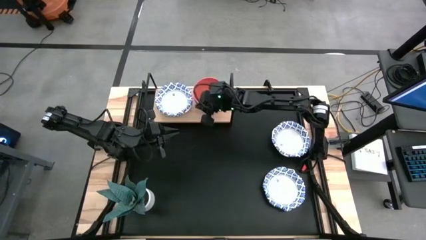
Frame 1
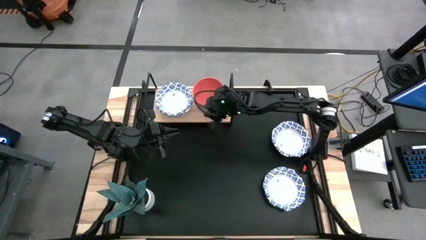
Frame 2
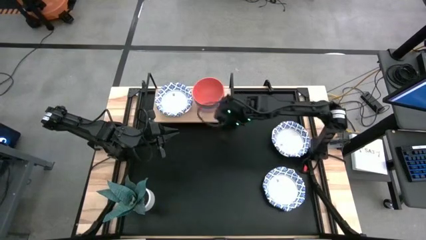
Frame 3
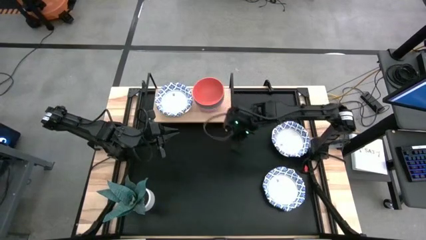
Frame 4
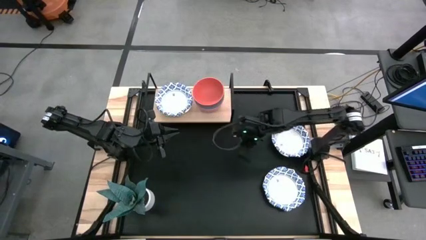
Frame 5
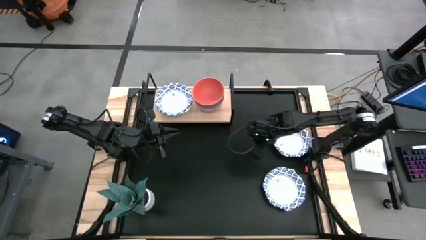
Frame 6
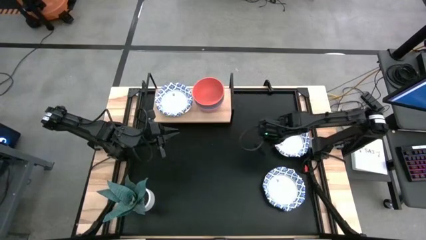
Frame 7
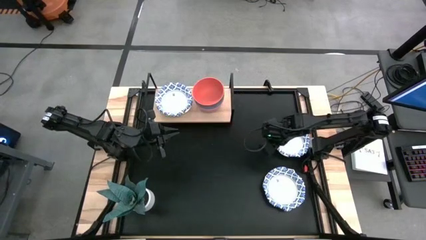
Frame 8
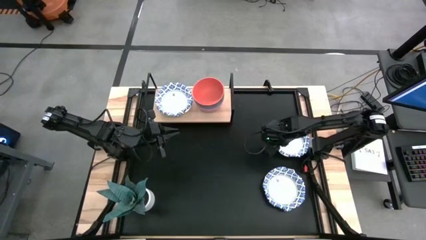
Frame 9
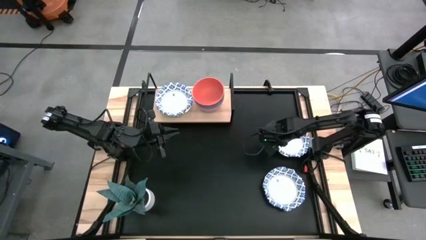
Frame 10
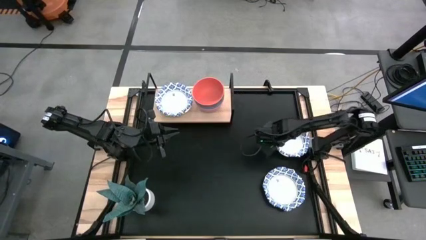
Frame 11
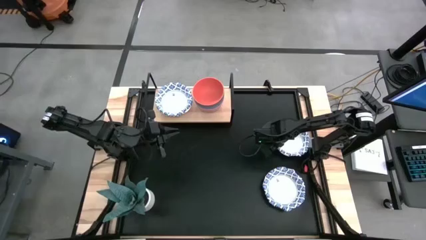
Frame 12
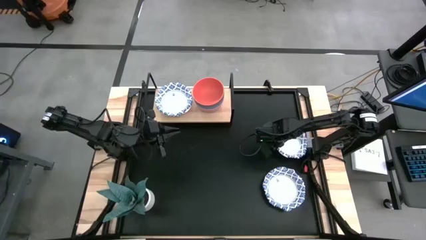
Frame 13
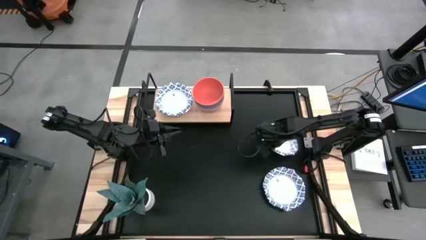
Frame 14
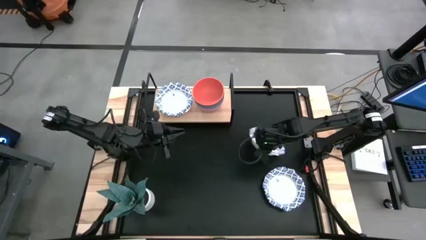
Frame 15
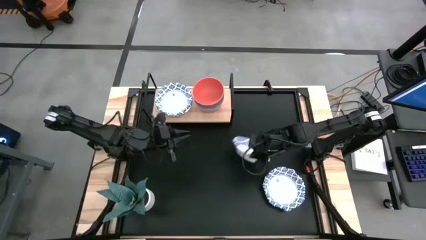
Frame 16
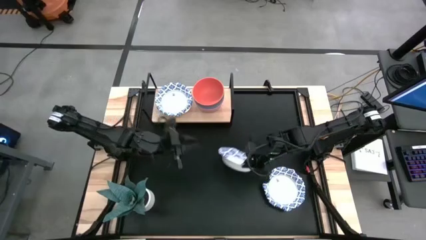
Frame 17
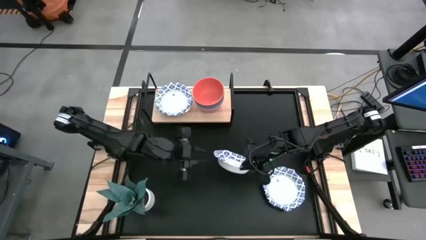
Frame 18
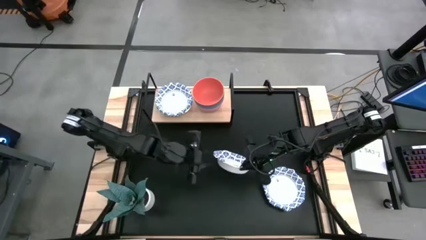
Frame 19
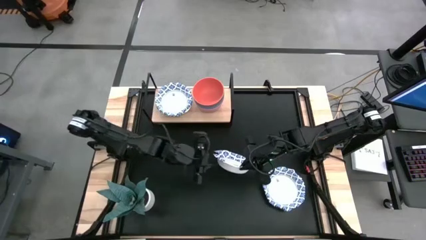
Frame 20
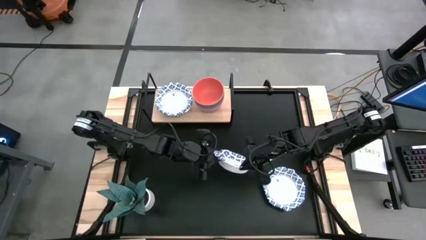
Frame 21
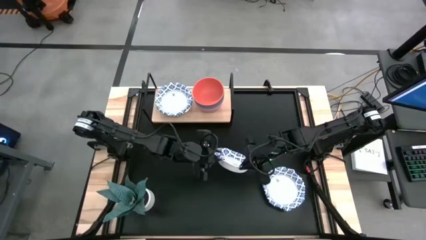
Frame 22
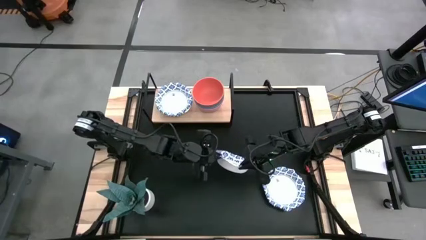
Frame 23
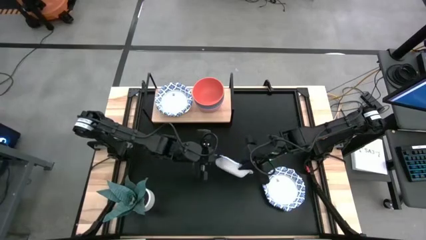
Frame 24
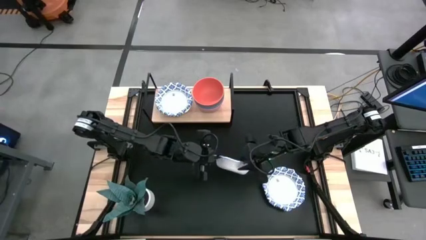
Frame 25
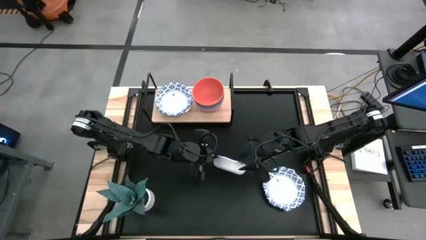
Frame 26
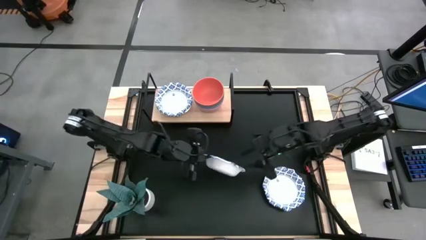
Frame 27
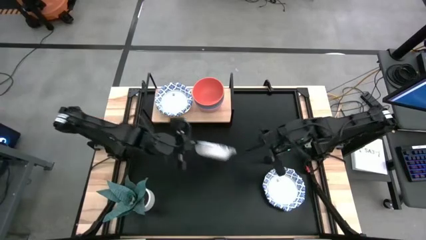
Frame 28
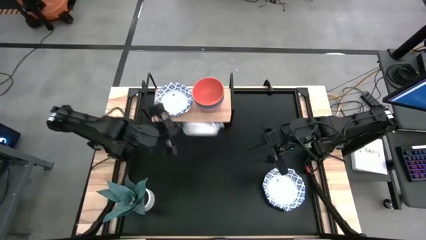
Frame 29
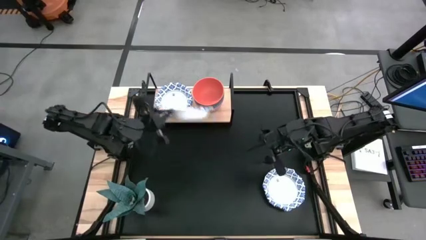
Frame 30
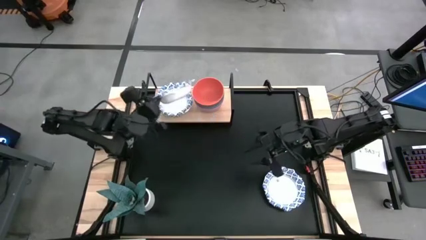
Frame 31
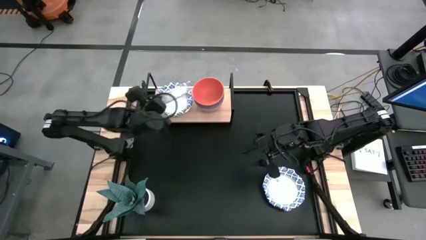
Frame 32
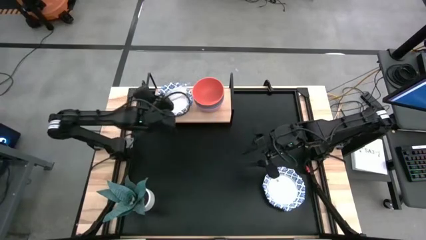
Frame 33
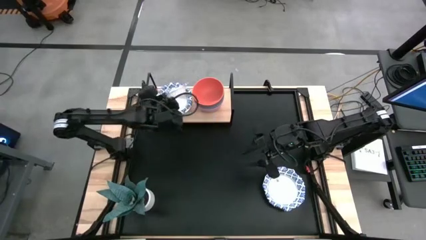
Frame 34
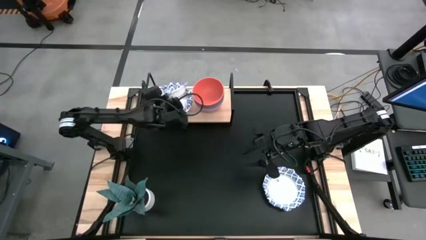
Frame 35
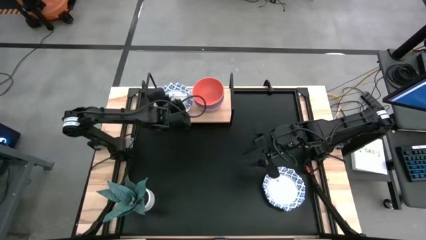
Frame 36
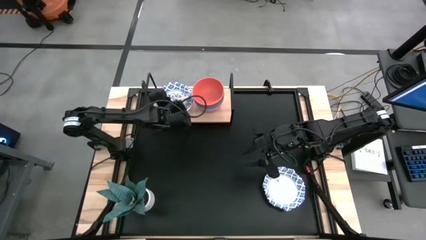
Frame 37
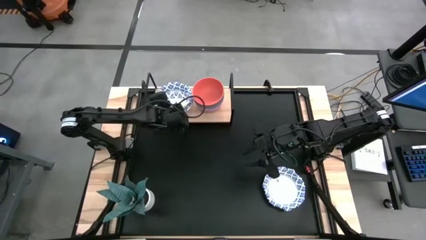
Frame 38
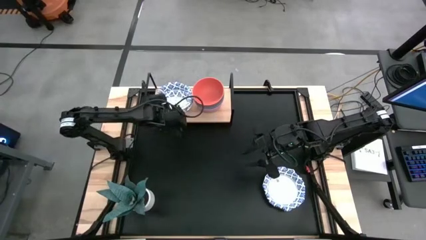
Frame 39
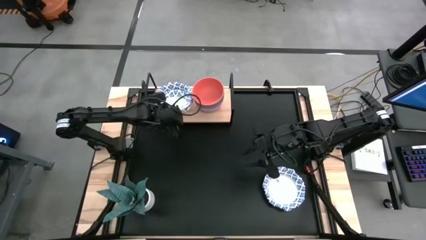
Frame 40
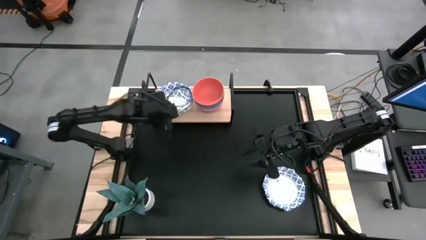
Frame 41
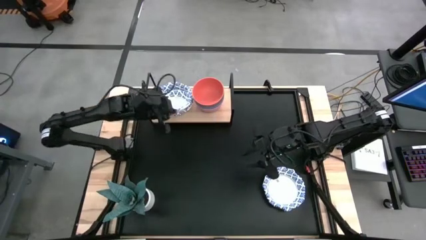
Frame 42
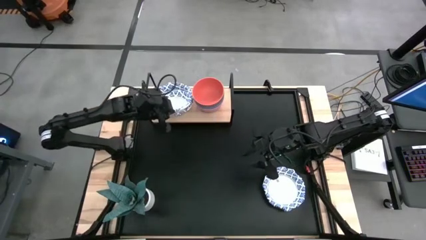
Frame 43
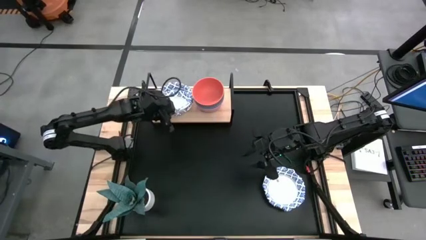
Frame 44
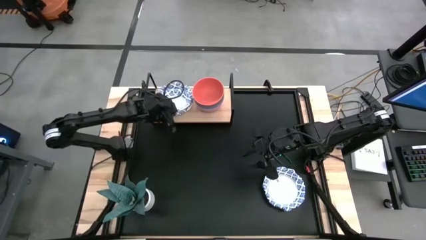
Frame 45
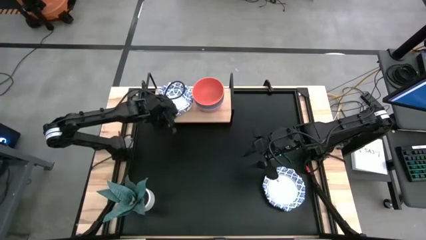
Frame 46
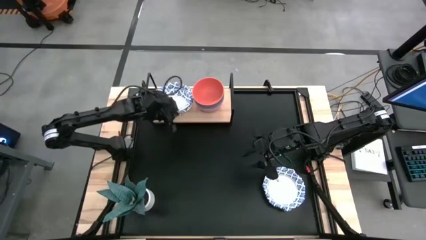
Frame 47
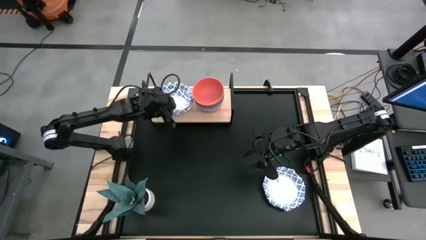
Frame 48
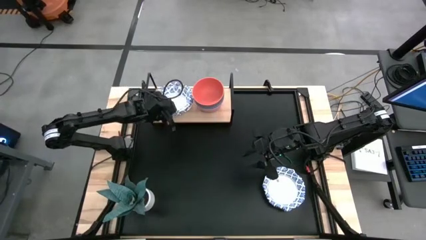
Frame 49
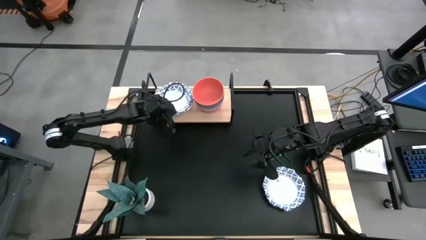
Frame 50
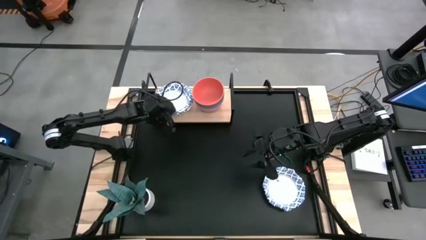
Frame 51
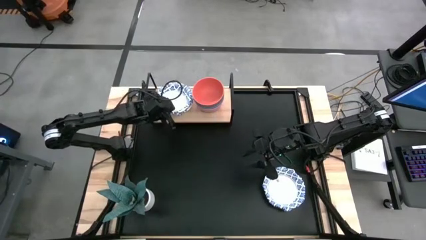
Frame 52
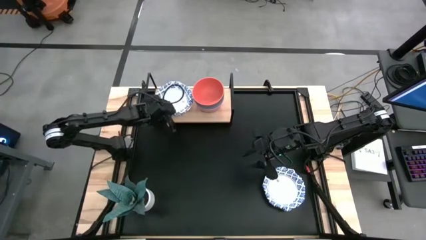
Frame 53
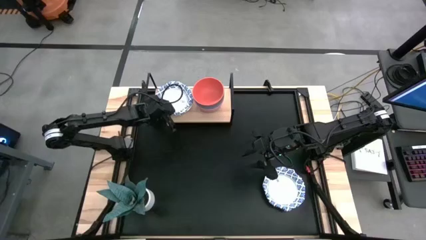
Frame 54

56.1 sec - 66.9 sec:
Task: Place and stack bowls onto a shelf
Stack the white patterned bowl on top of the white patterned bowl

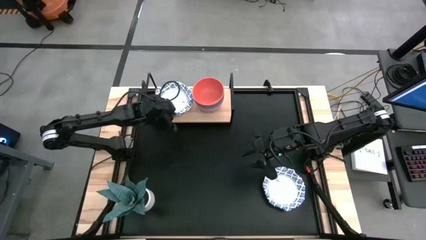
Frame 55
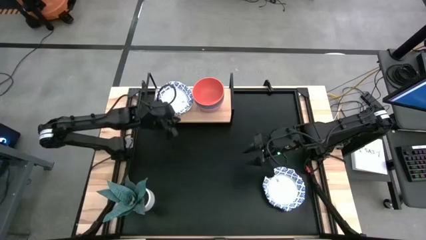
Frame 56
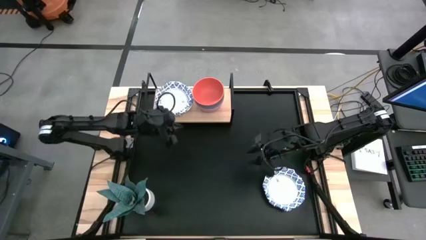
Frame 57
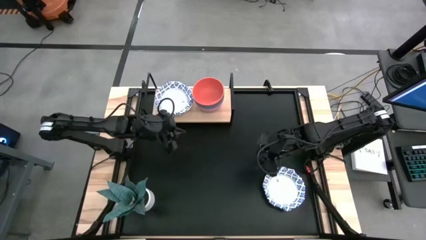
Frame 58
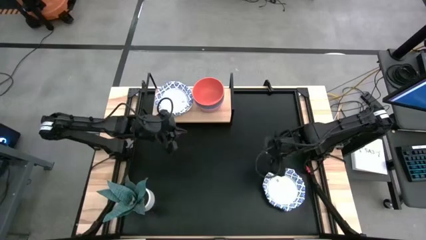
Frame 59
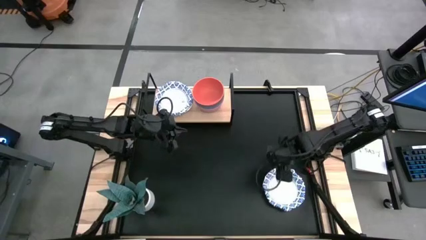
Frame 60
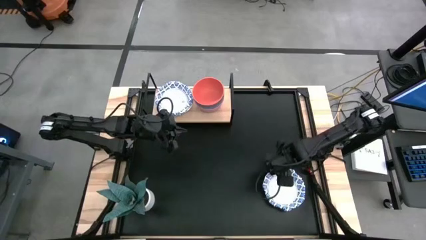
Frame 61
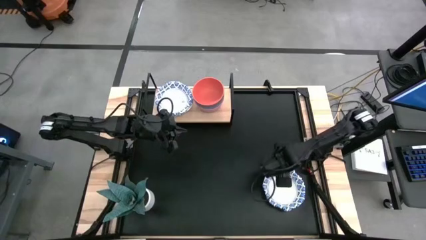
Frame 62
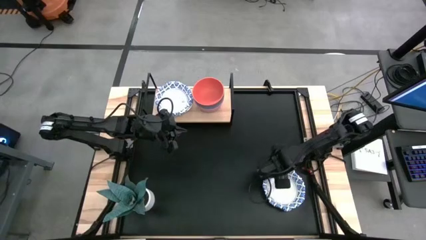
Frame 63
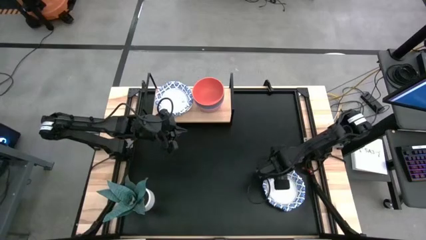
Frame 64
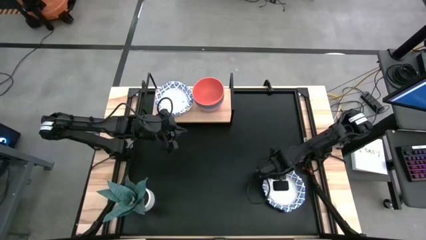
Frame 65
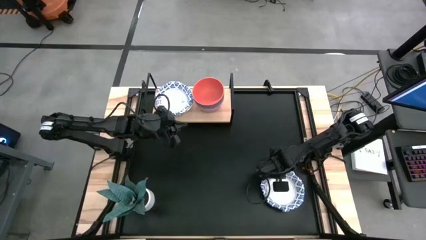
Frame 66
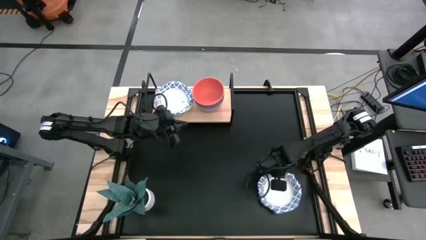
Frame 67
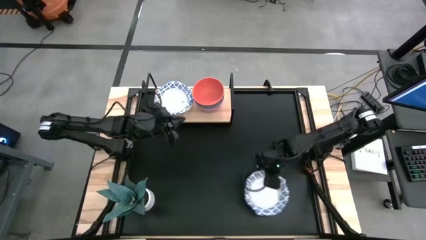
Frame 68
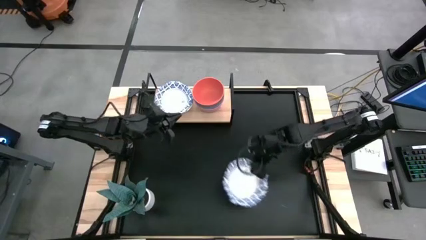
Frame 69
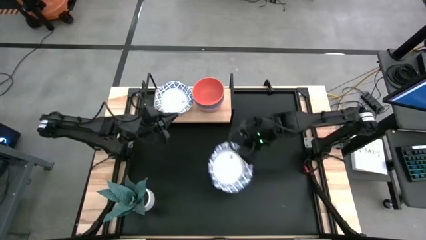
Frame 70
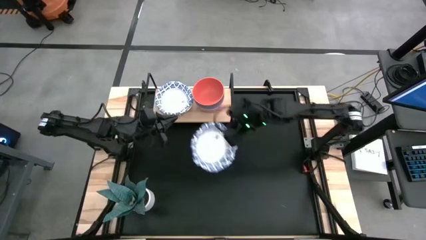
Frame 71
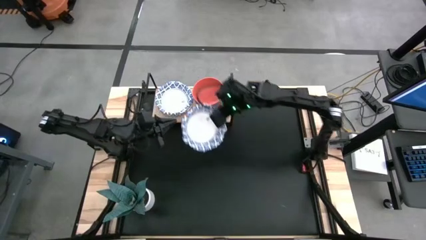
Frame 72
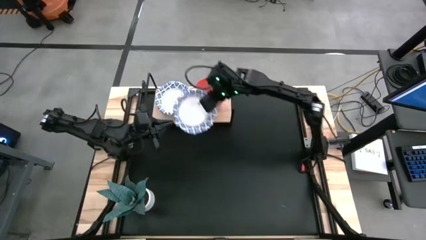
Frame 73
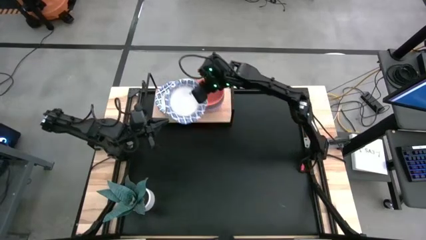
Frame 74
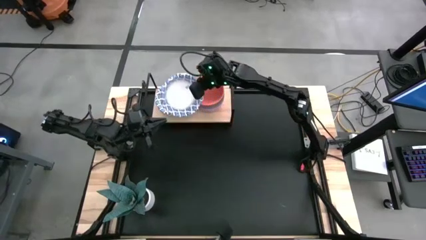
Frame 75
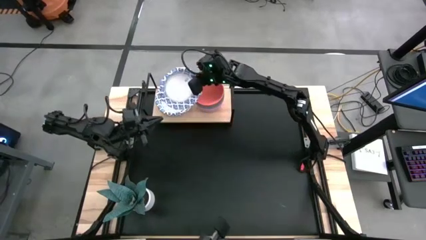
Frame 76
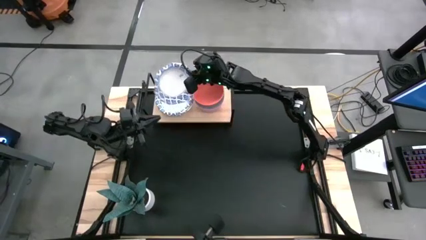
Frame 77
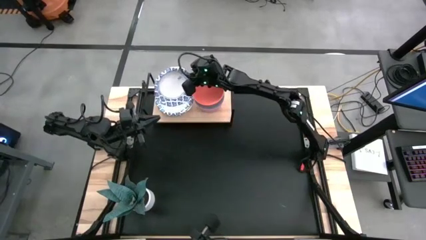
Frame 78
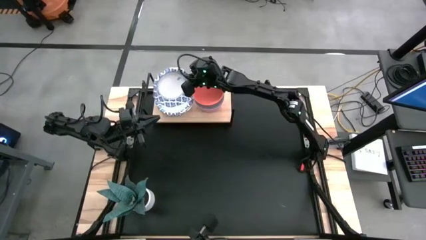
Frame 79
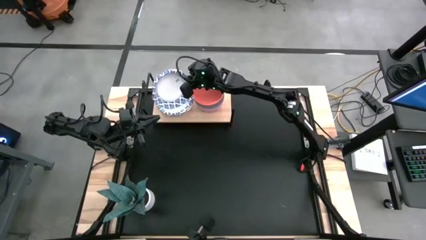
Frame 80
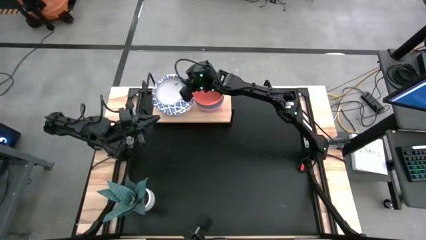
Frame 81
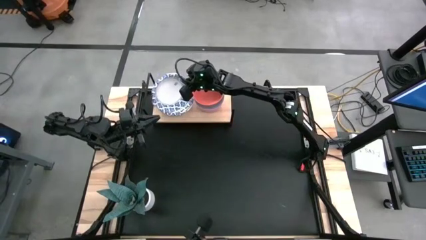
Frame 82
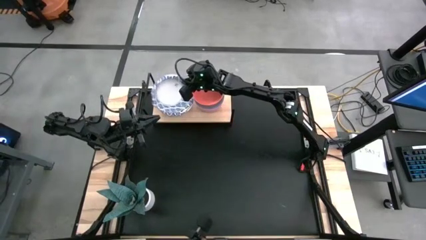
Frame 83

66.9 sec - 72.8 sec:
Stack the white patterned bowl on top of the white patterned bowl

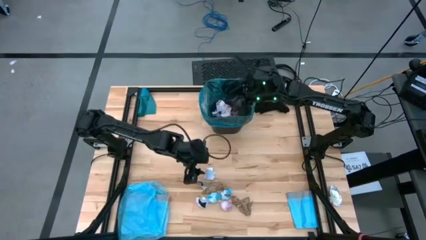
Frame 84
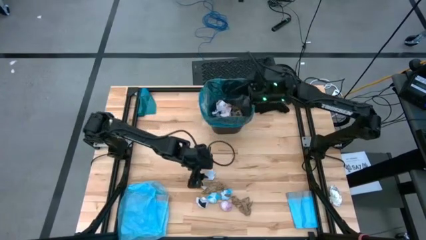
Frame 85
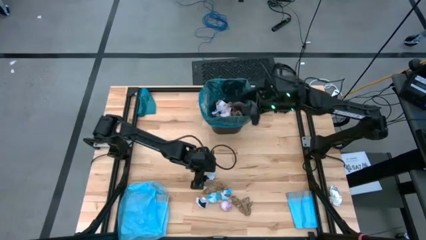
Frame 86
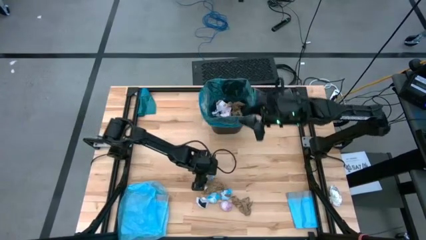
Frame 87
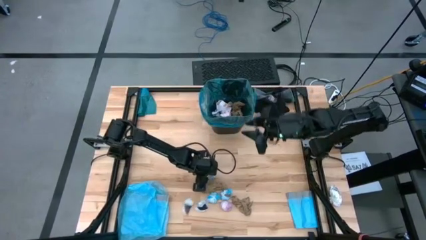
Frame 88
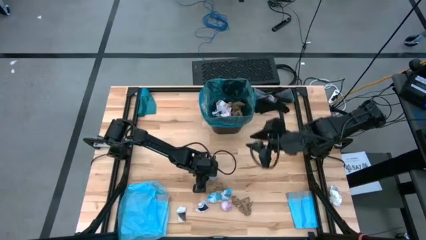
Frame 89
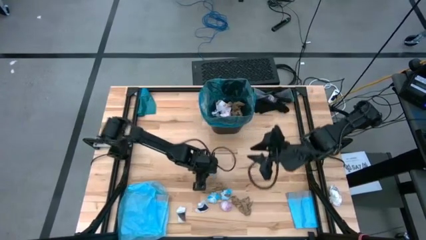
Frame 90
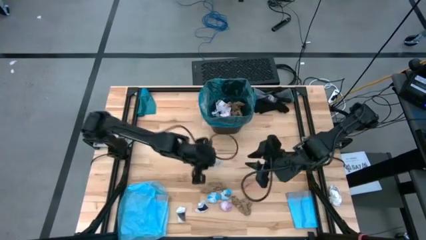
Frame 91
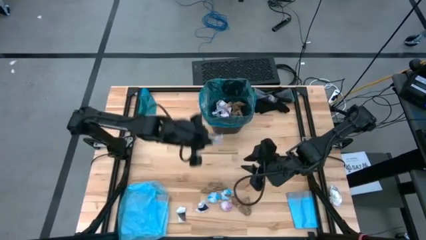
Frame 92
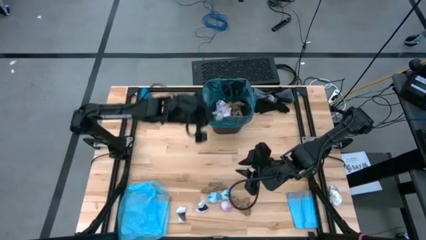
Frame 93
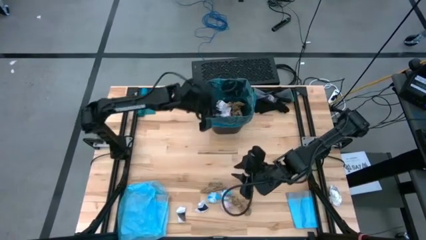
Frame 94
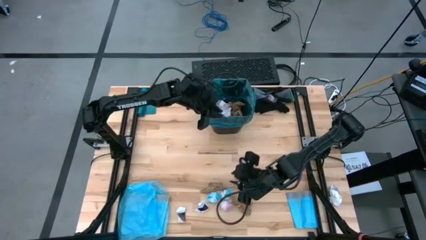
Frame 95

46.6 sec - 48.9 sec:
Task: place trash/remove bag and relplace
Put the white paper into the blue trash bag inside the black trash bin
